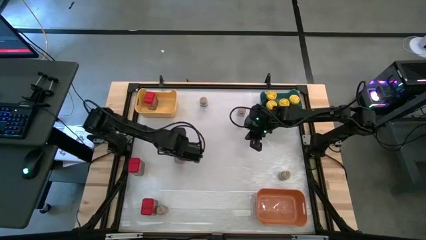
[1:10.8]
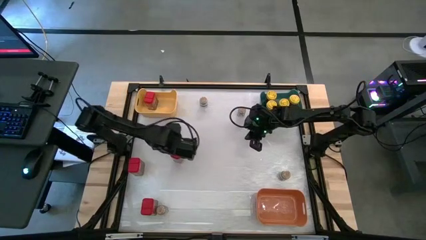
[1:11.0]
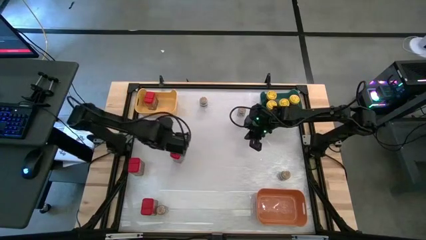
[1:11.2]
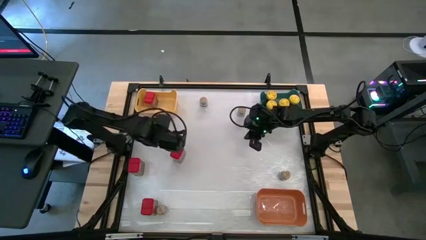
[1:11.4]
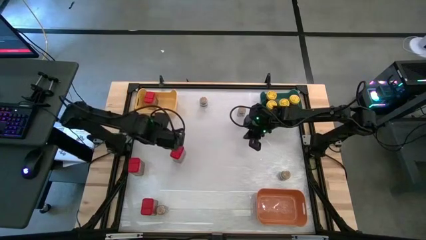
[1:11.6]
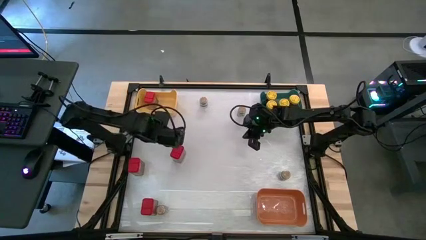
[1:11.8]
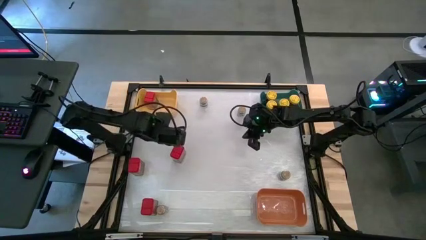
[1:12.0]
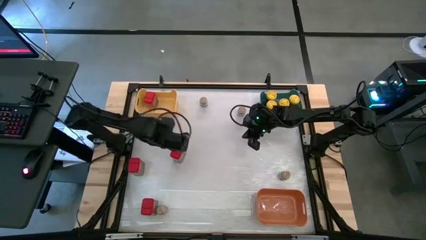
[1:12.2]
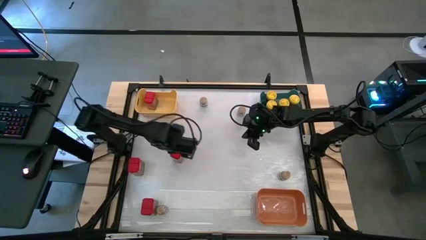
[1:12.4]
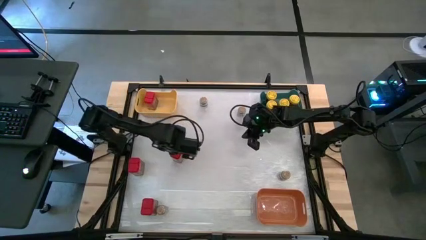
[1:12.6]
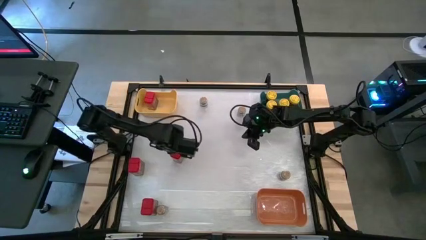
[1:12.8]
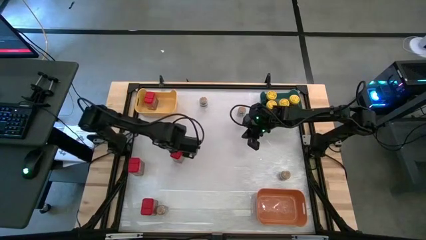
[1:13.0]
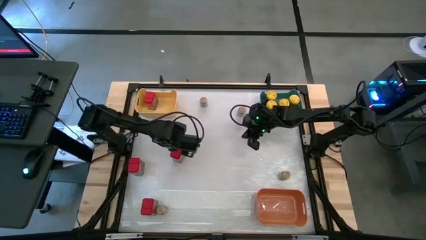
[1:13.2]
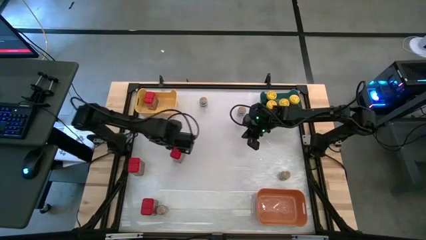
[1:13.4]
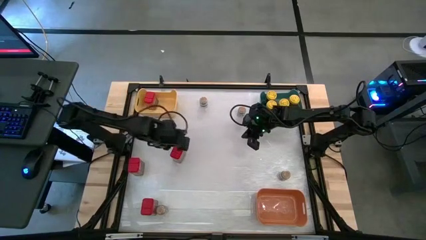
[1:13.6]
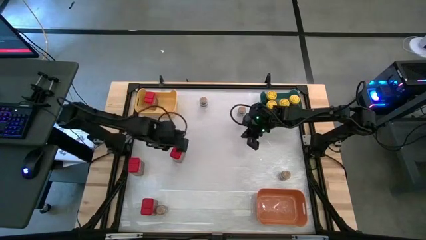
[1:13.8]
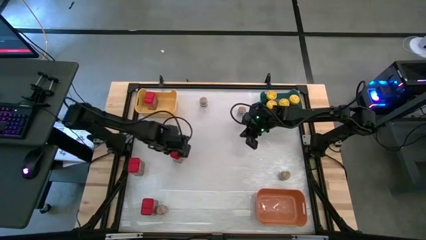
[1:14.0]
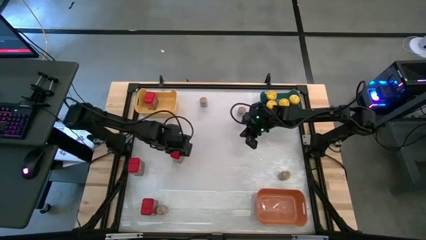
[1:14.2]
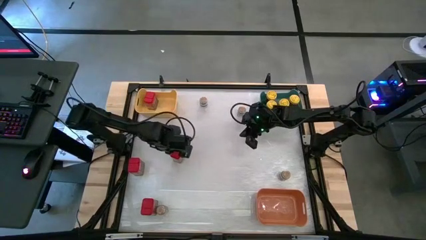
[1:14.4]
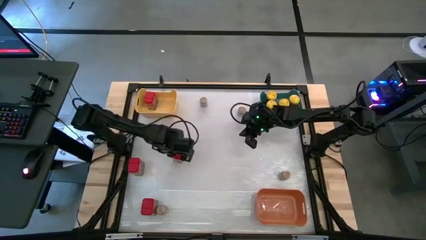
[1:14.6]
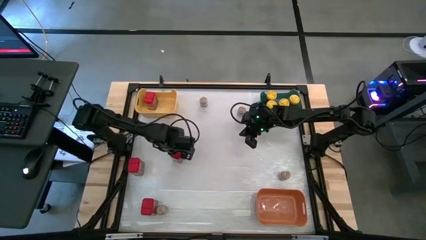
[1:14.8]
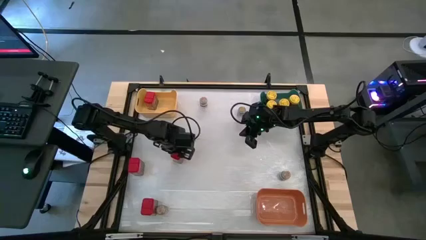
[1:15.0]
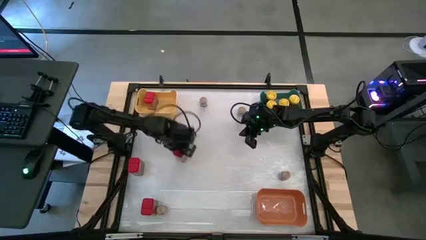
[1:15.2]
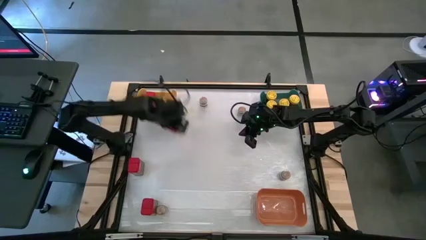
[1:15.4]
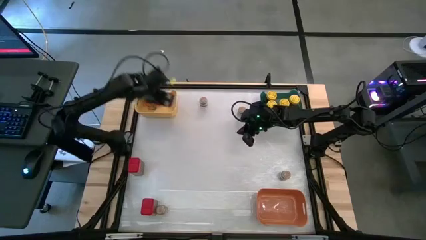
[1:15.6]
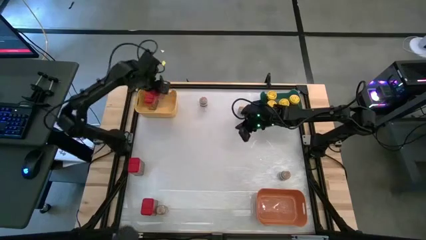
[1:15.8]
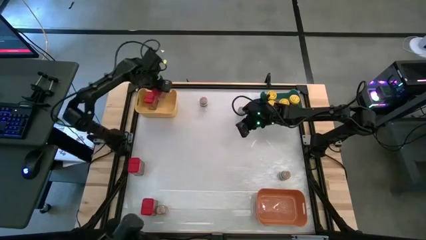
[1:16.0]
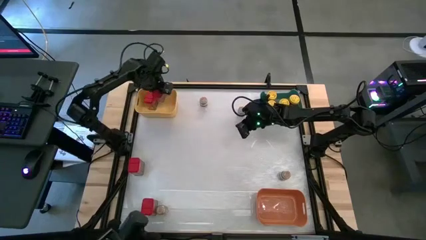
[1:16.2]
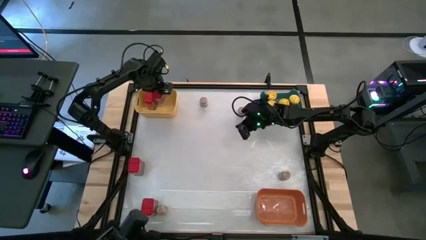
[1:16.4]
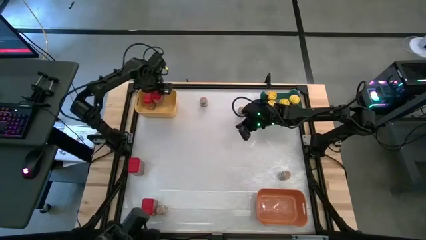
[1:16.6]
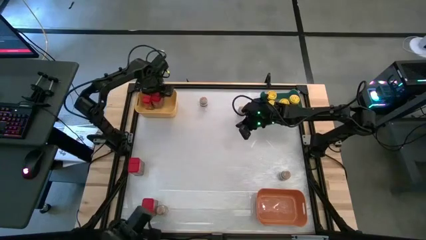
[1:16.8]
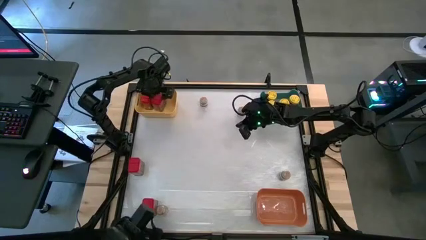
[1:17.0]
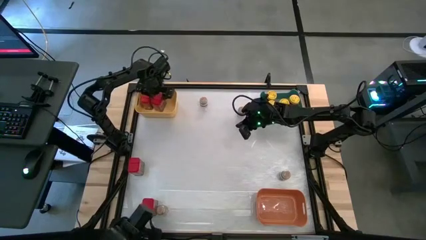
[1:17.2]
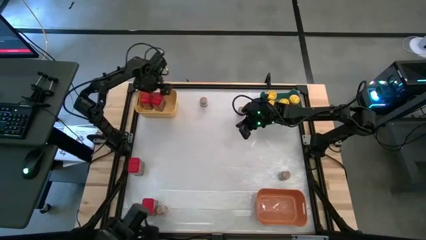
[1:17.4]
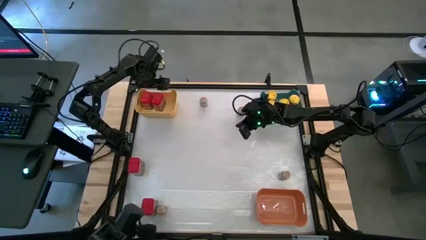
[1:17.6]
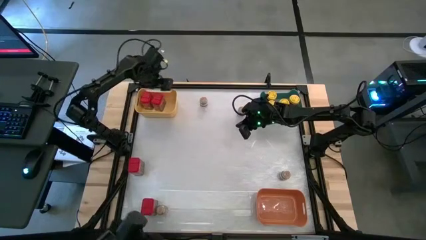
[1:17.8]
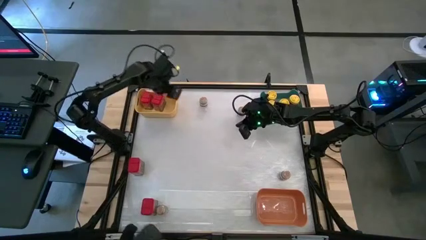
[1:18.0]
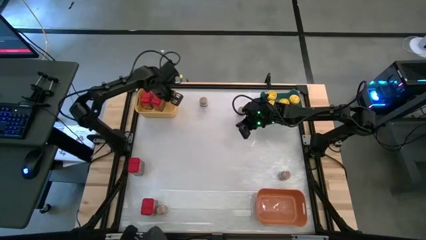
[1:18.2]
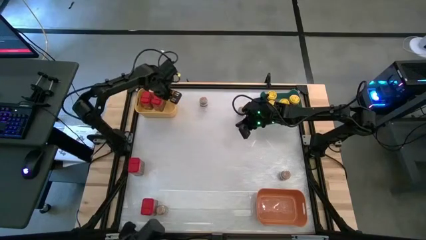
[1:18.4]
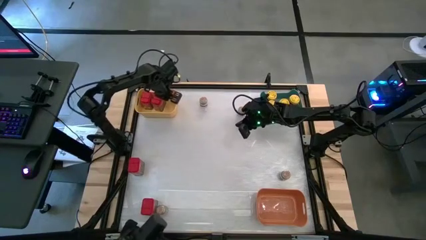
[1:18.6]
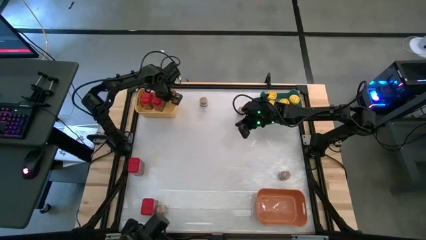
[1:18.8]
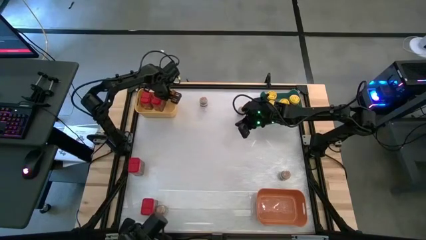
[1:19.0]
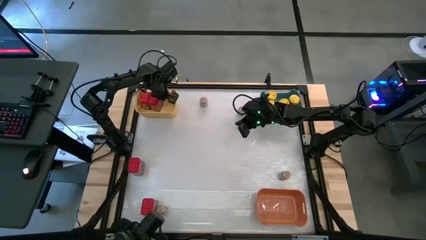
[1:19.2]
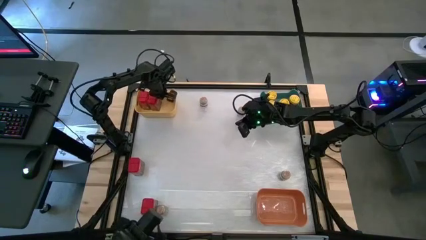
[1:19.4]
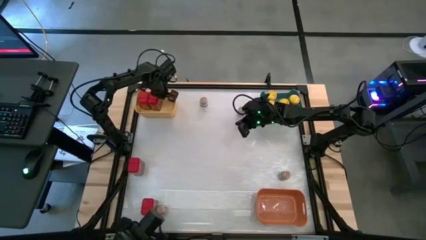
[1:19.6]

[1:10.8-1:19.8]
Task: Sort spices by type
Put the right red seasoning can into the yellow bin

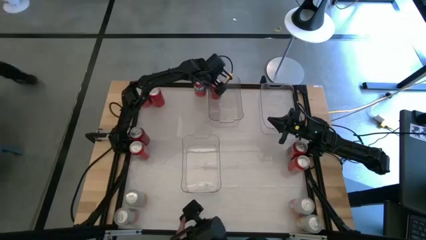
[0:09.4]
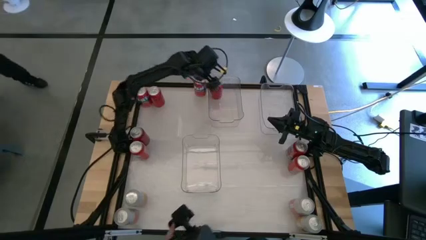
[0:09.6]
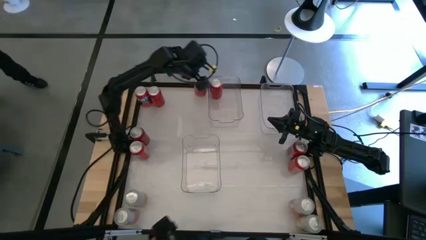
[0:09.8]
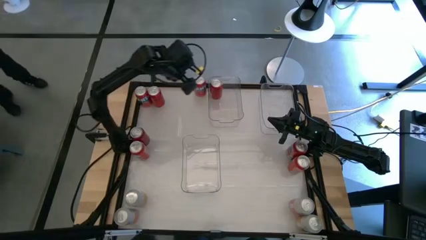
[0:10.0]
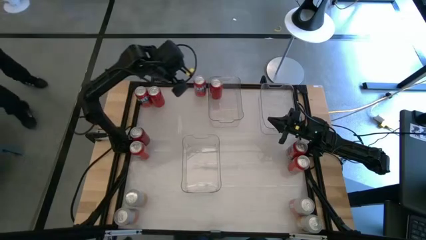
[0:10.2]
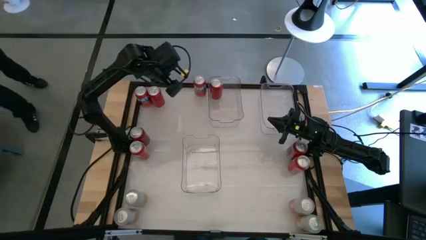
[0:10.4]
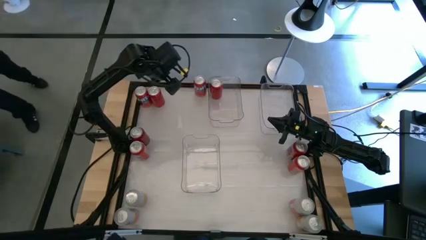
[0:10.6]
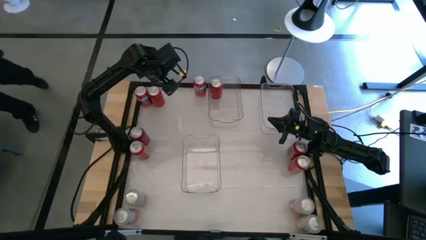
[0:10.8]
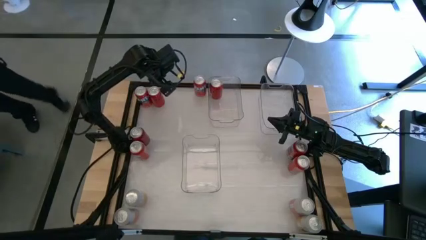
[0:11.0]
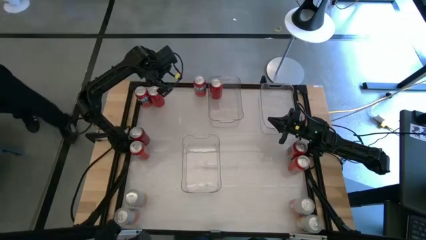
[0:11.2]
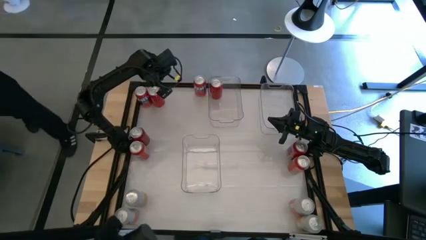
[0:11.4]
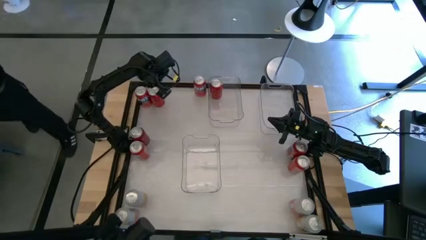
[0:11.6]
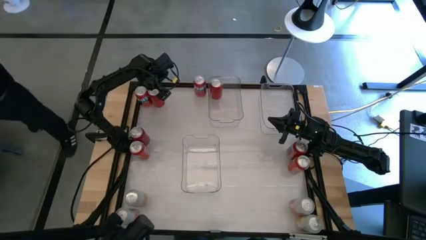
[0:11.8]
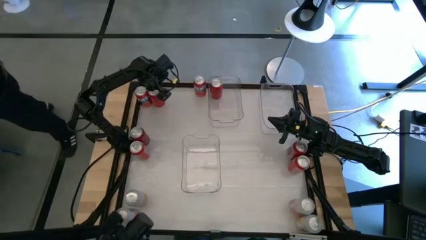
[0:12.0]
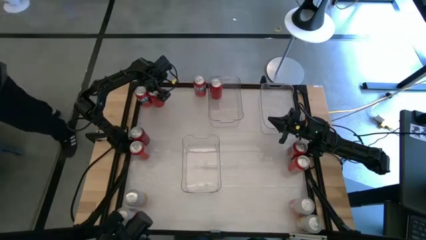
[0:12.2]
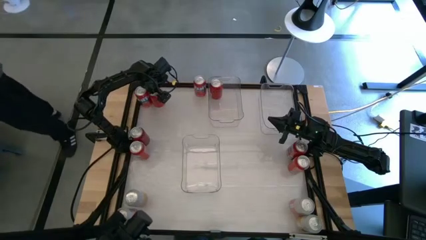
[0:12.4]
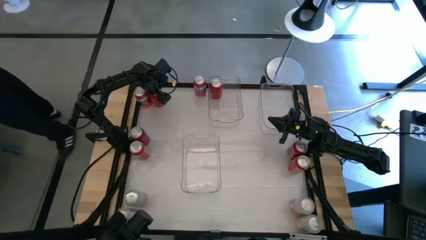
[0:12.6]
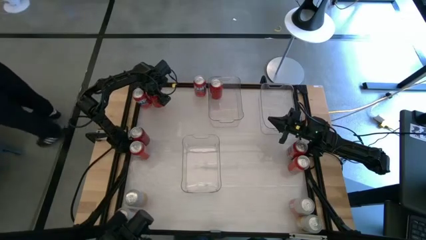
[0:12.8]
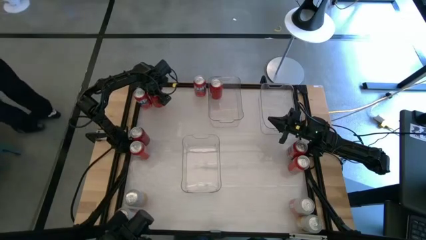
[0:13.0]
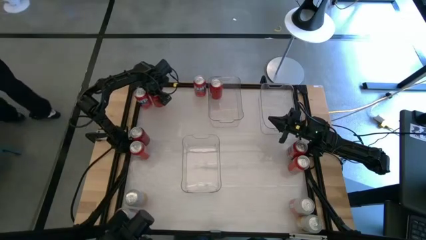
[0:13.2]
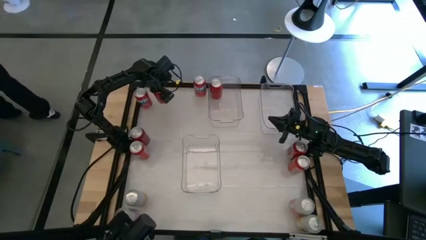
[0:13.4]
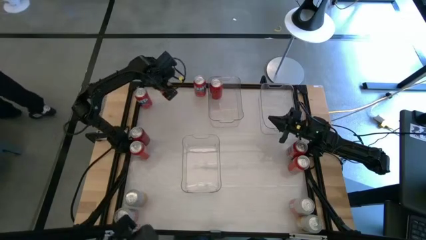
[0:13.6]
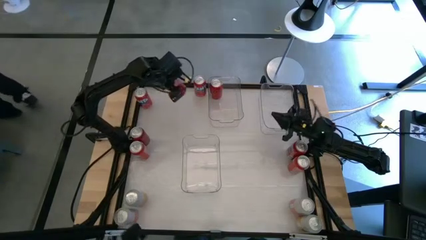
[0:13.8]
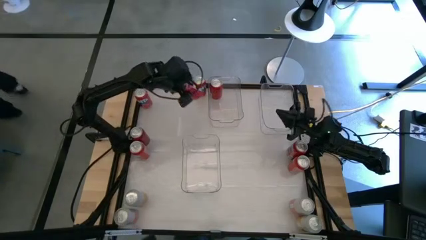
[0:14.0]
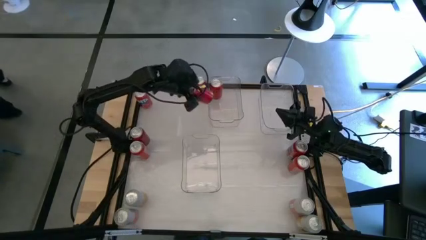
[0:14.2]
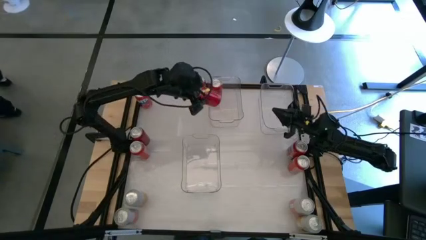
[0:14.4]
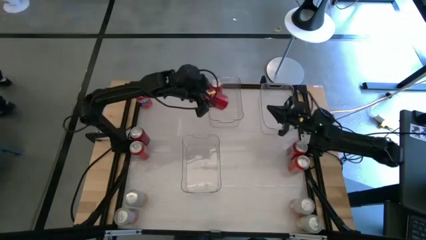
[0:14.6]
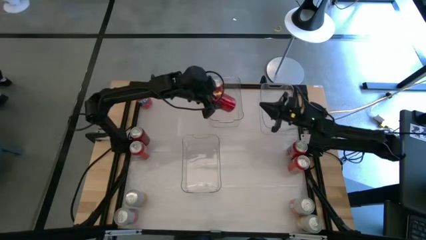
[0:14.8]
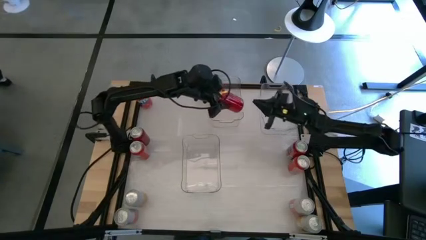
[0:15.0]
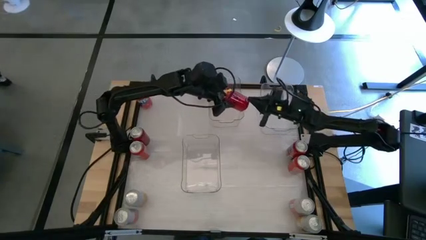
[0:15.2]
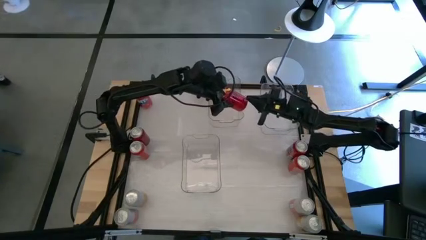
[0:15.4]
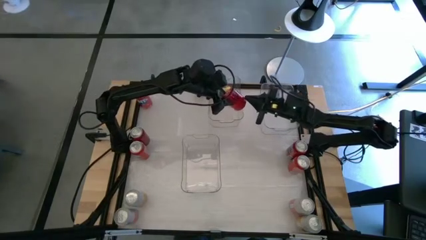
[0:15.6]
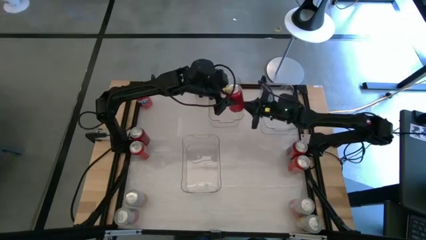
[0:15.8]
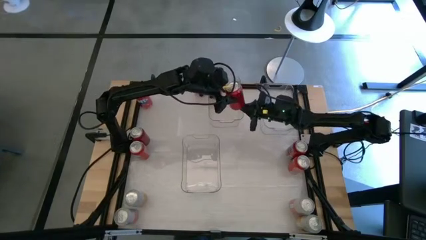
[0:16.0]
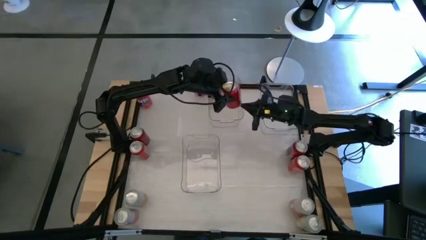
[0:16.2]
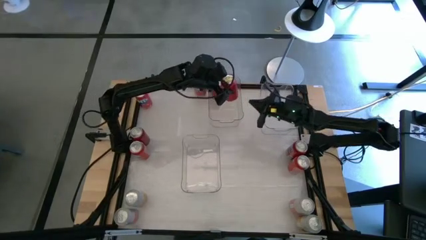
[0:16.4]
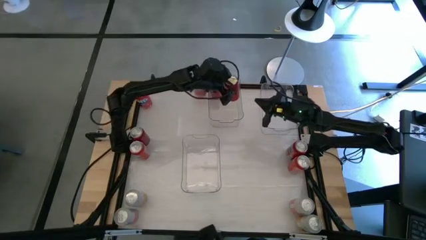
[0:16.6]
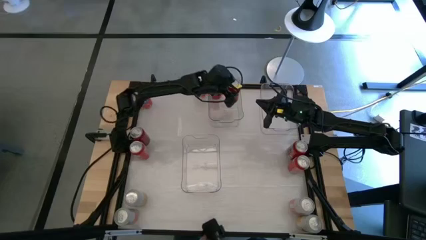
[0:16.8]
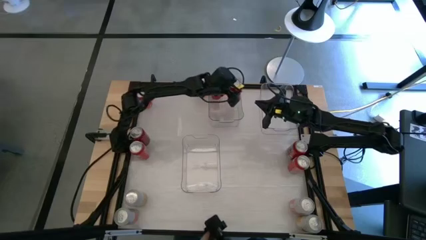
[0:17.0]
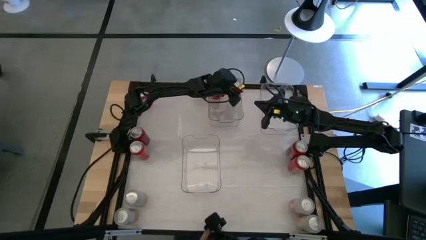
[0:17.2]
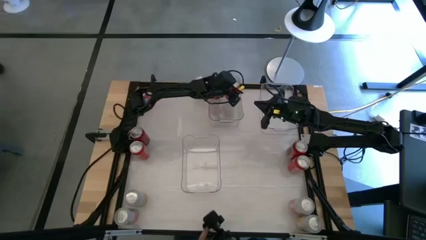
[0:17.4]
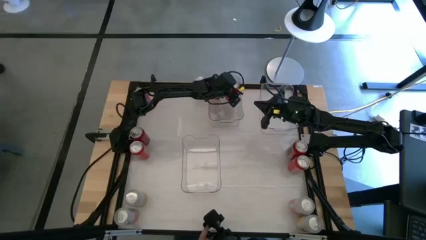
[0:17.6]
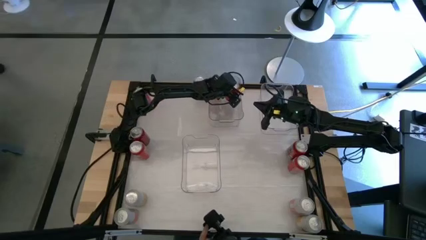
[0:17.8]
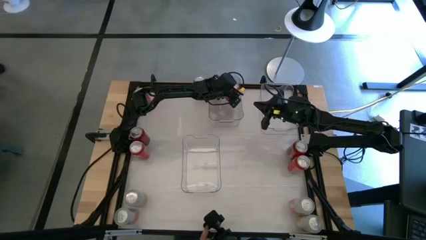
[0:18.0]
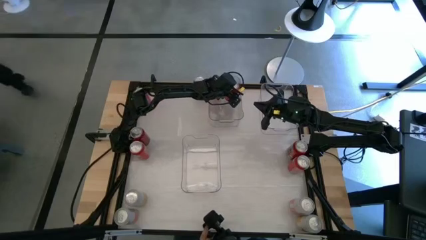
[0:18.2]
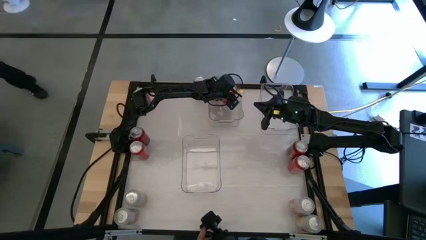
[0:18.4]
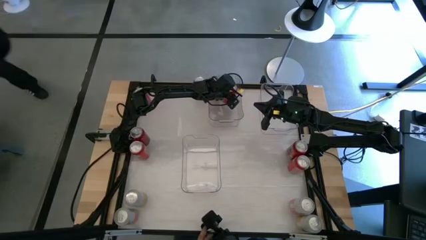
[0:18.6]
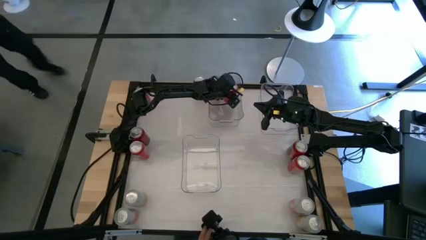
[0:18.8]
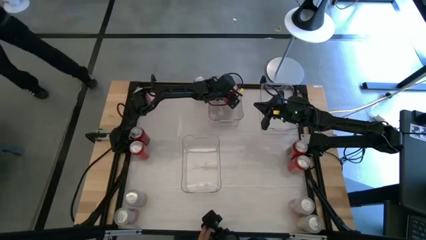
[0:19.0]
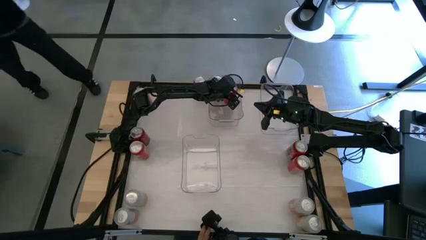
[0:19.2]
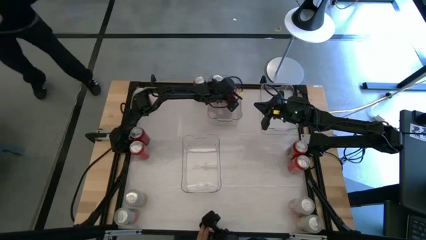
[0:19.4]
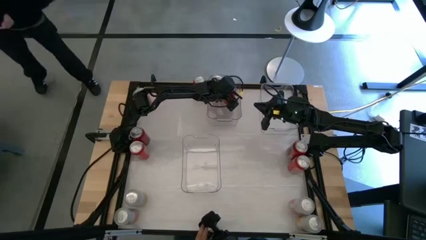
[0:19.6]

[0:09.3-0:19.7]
Task: Sort soda cans
Put the top red-black soda can into the top left transparent bin
